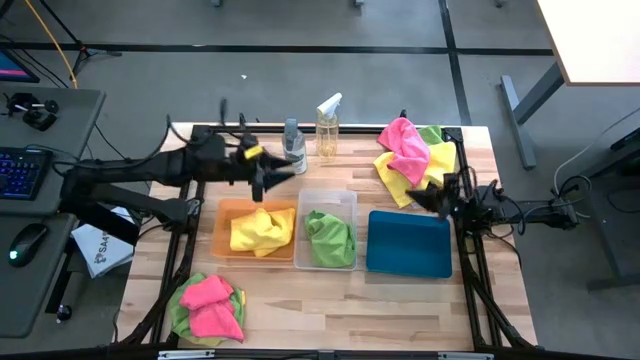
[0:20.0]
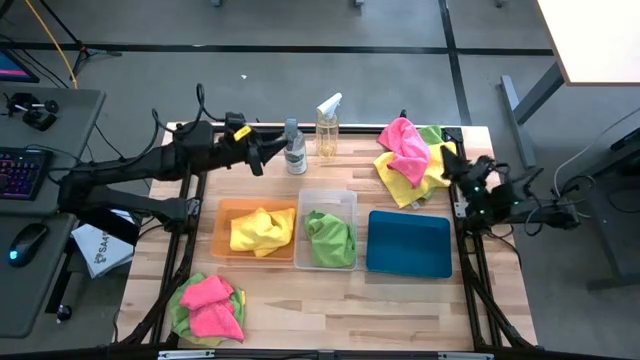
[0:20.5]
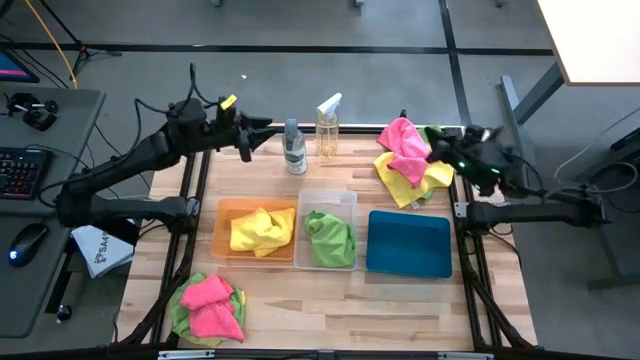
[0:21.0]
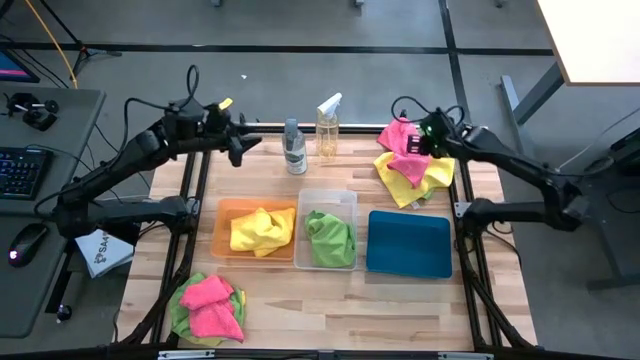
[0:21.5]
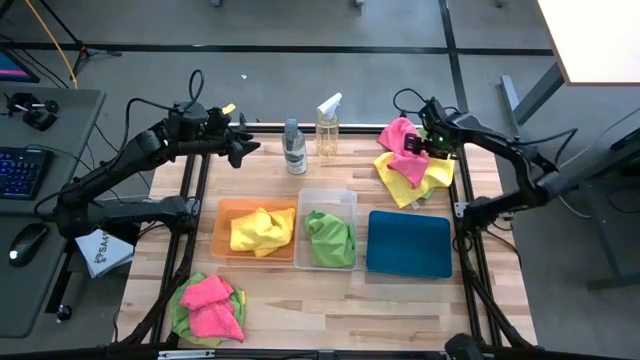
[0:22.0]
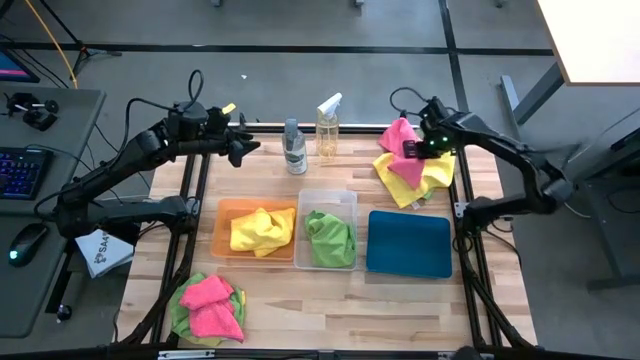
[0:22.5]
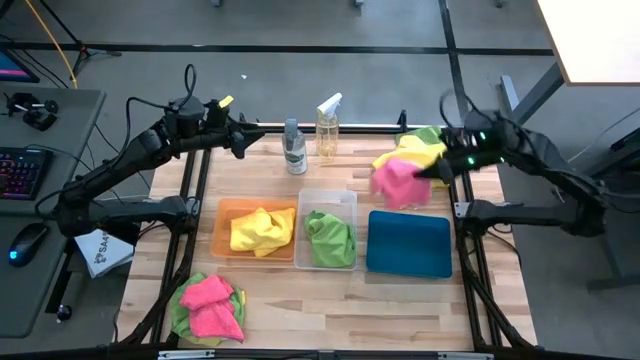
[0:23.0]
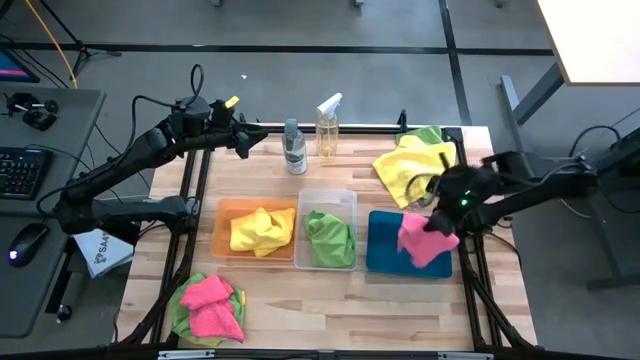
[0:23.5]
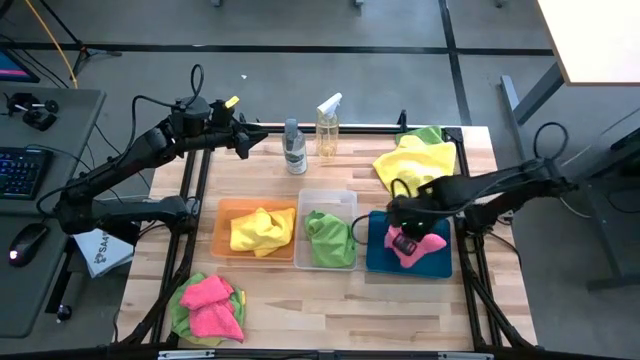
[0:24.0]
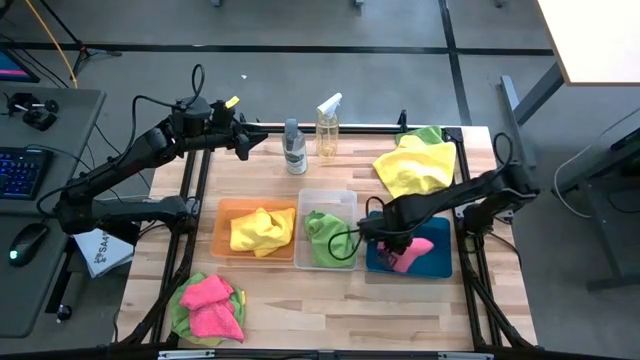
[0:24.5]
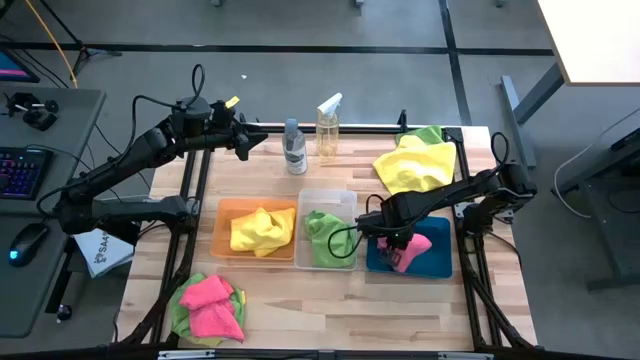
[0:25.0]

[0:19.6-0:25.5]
Task: Sort microfiber towel by color & place in baskets
Put the top pink microfiber cloth into the blue bin

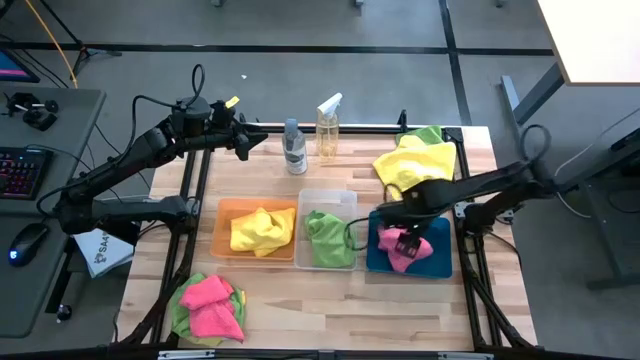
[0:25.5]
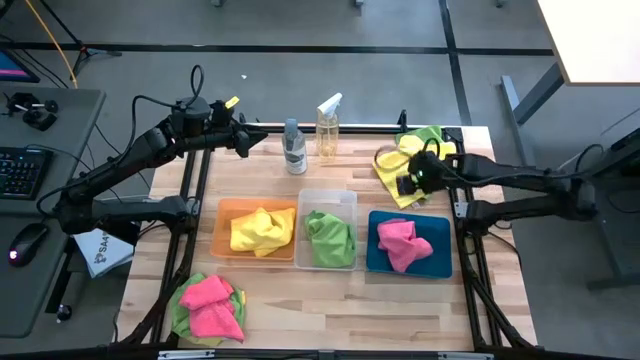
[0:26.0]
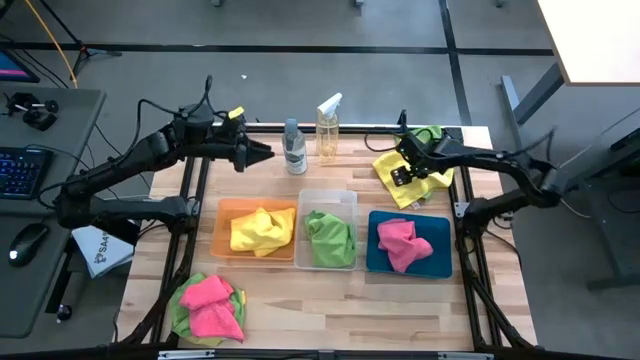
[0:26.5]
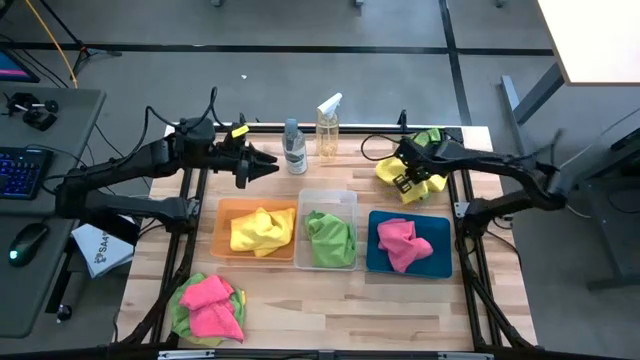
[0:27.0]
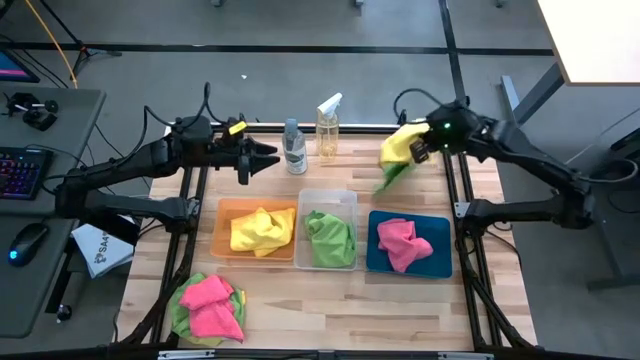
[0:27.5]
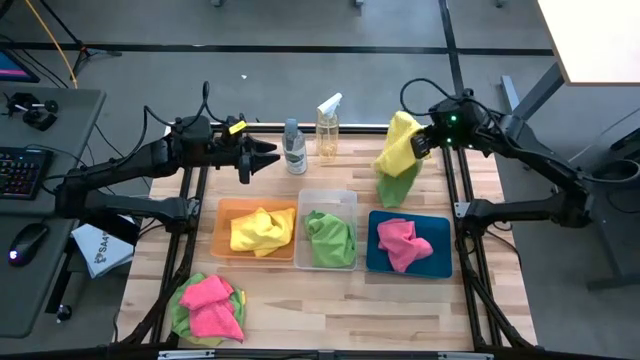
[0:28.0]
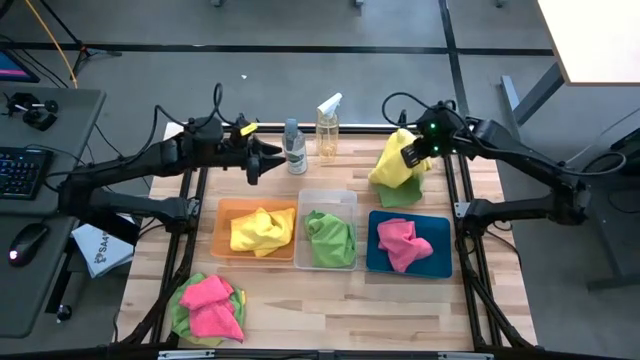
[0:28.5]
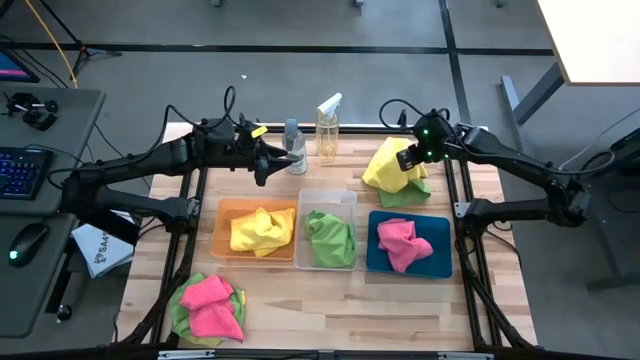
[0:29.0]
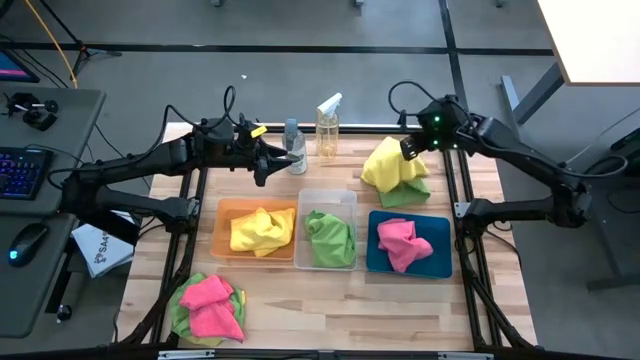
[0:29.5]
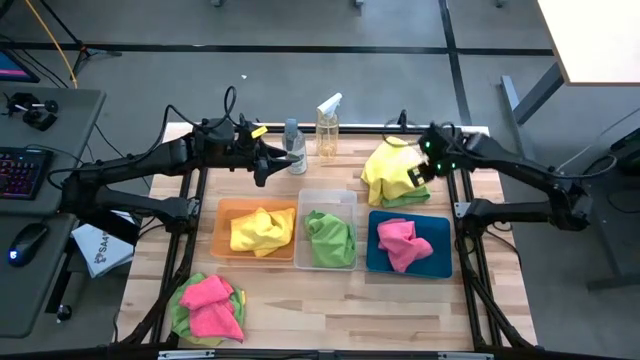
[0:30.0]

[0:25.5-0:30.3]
Put the top yellow microfiber cloth into the orange bin

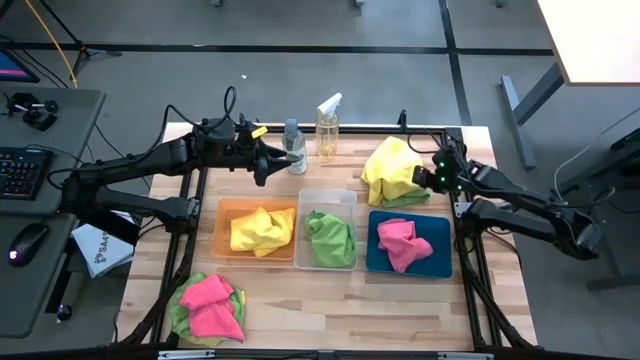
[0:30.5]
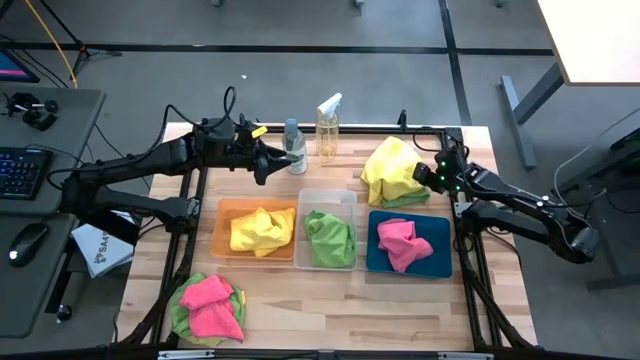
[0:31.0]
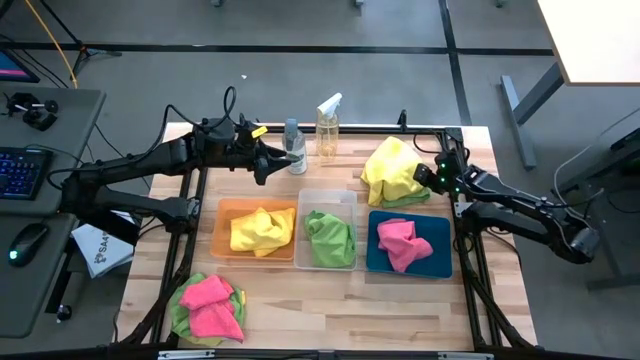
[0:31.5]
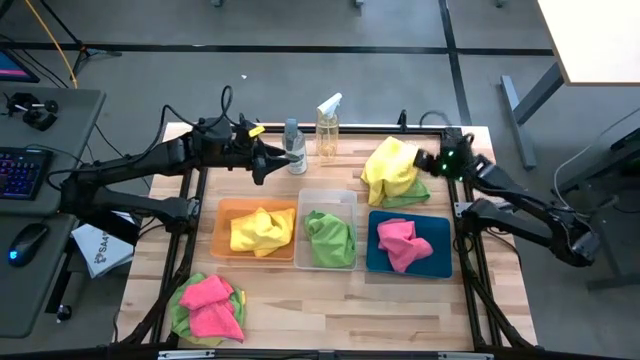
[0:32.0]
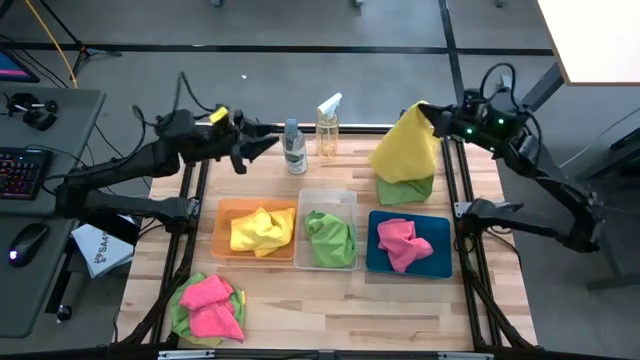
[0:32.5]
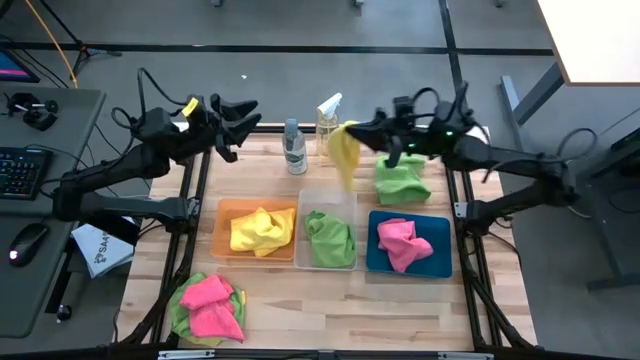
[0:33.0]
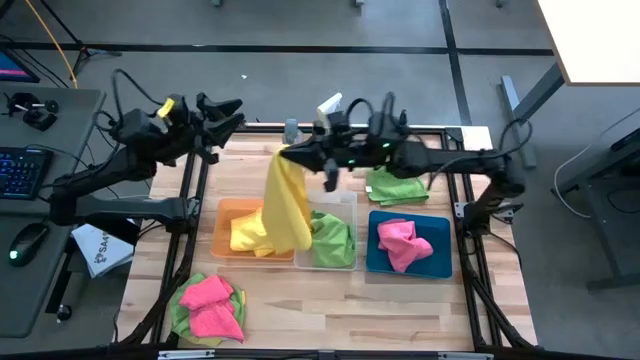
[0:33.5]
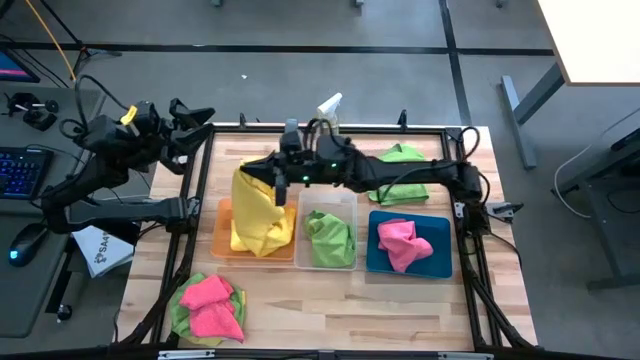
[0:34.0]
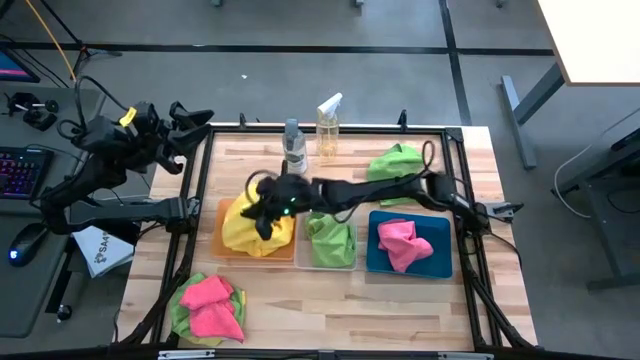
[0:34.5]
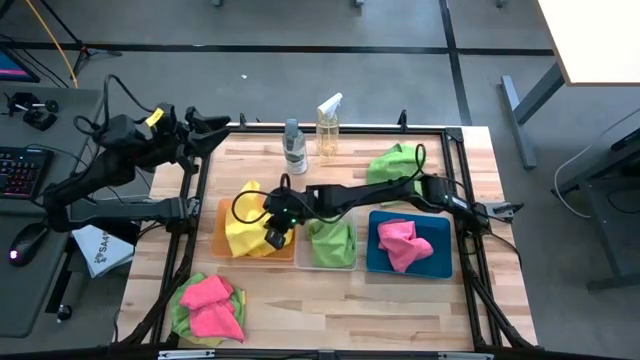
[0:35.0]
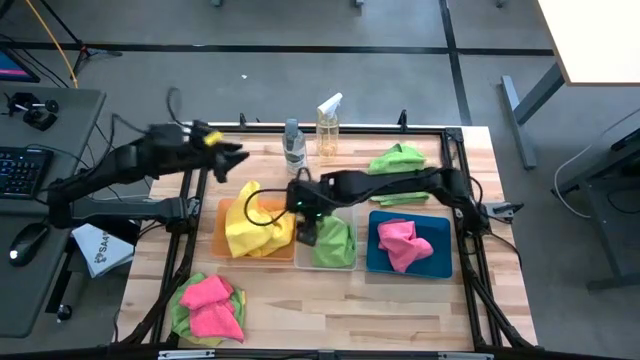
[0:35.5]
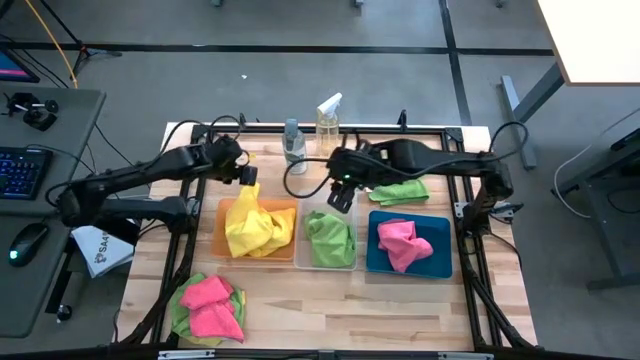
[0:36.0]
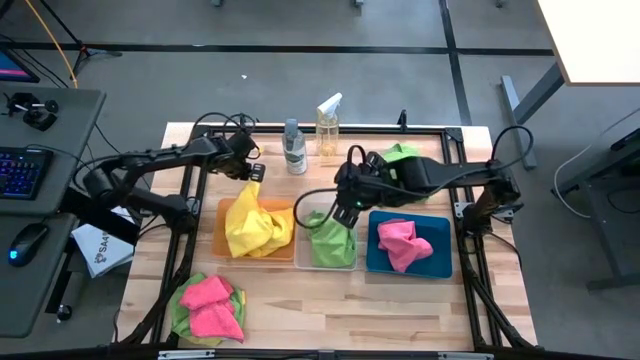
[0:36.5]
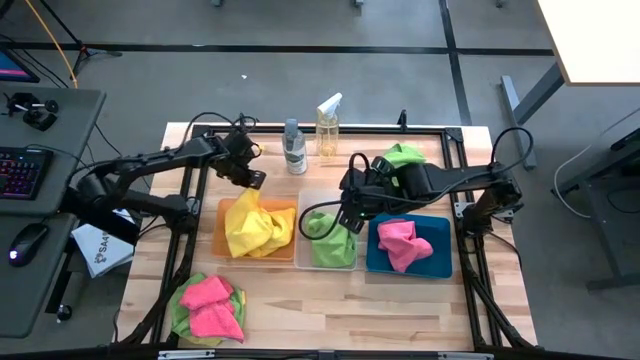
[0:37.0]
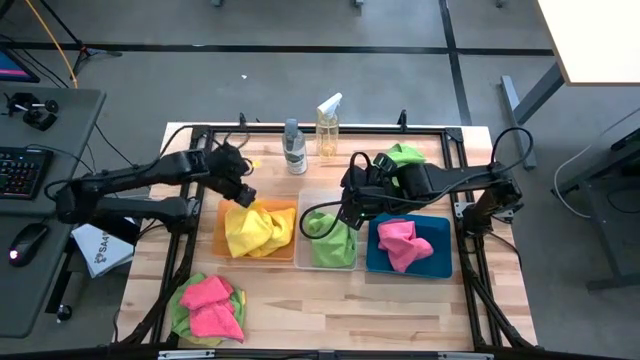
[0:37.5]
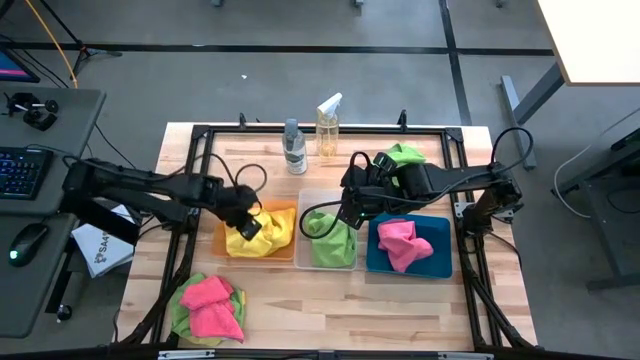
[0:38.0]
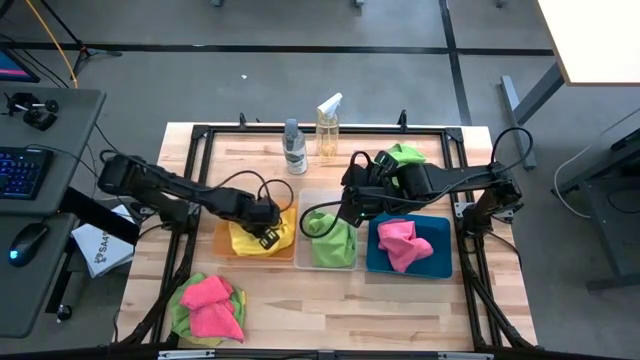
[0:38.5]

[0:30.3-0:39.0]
Put the top yellow microfiber cloth into the orange bin

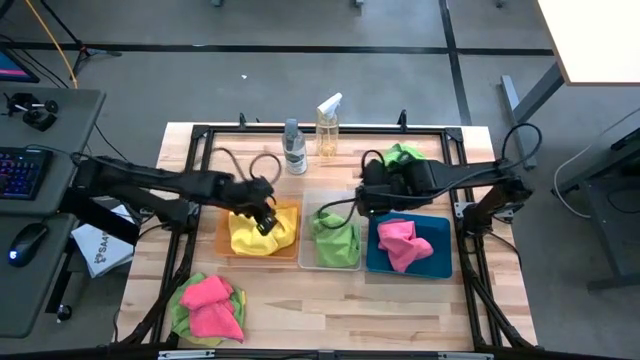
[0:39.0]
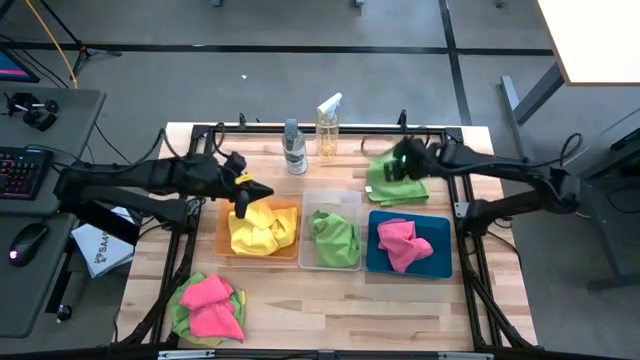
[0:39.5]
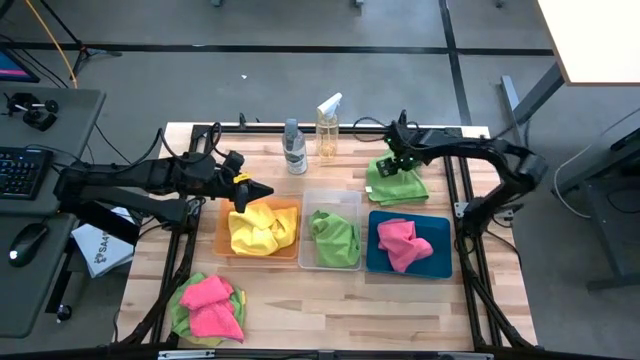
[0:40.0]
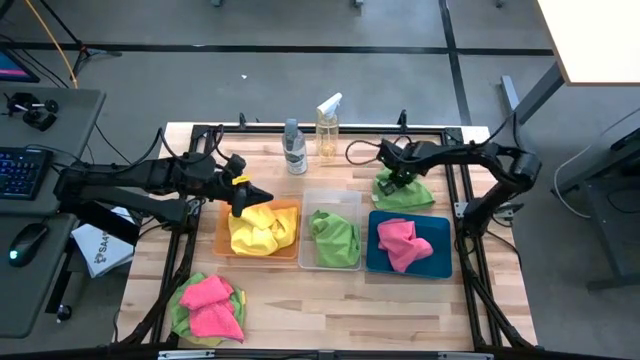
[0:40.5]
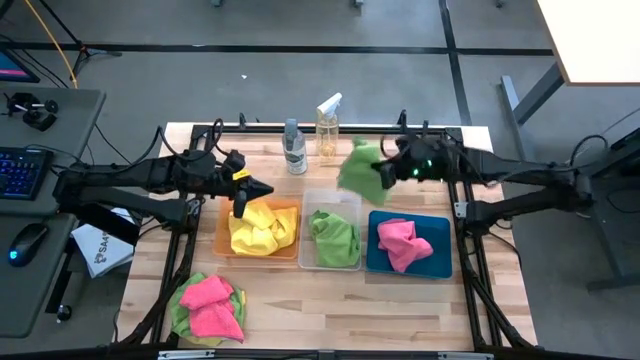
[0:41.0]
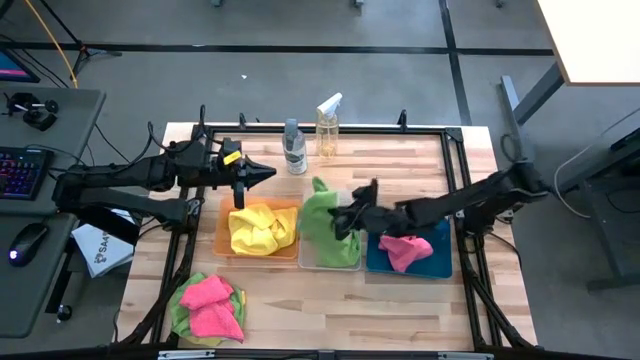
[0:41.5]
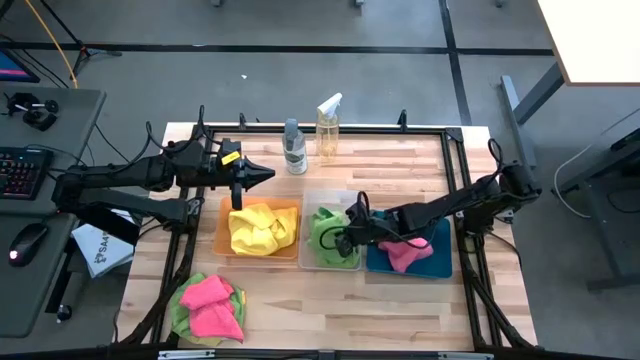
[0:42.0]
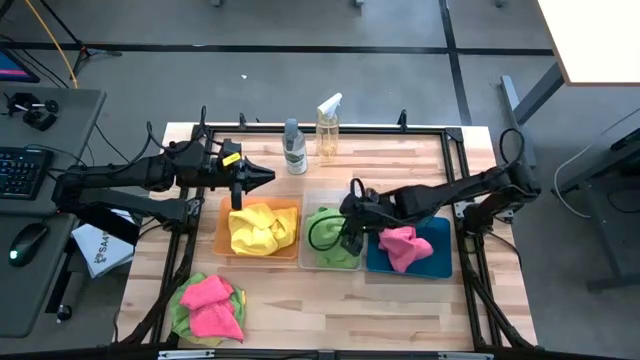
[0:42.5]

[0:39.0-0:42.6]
Put the top green microfiber cloth into the transparent bin
